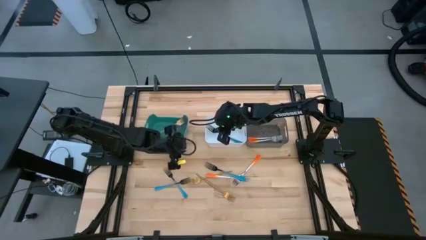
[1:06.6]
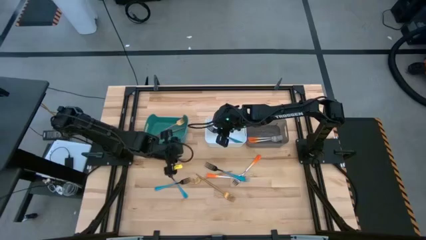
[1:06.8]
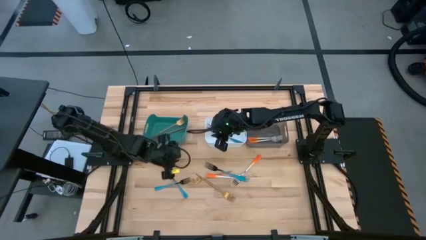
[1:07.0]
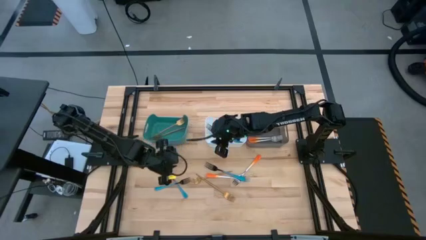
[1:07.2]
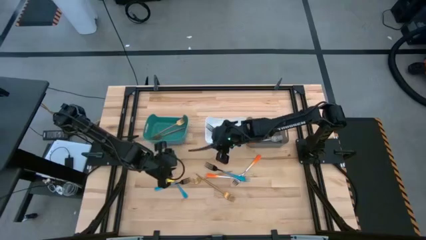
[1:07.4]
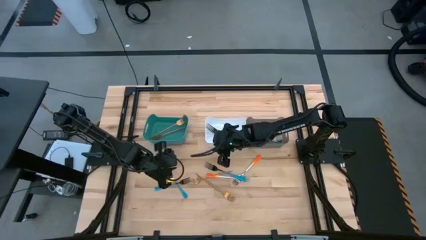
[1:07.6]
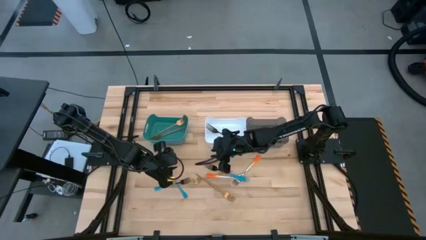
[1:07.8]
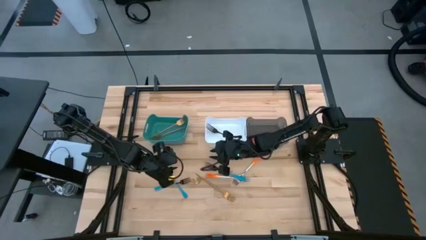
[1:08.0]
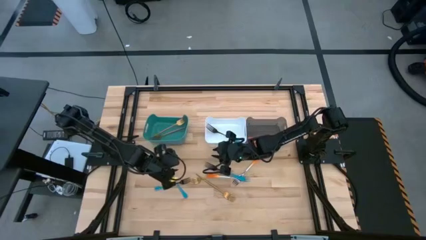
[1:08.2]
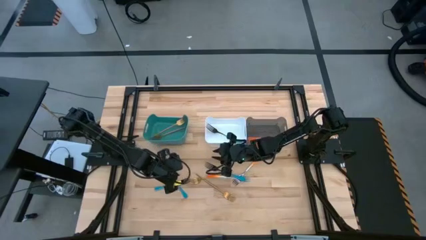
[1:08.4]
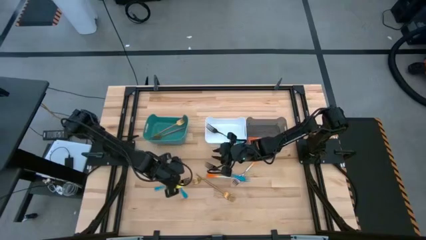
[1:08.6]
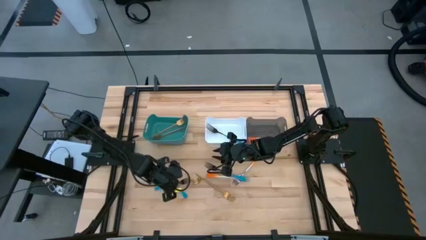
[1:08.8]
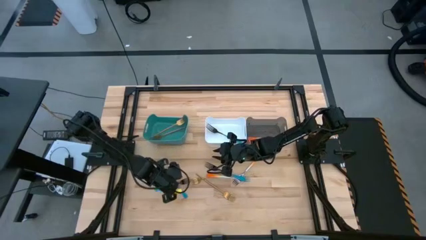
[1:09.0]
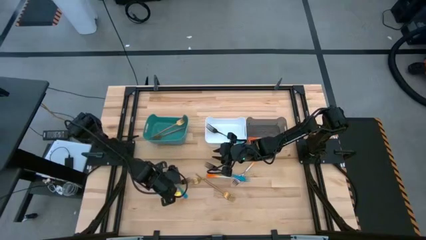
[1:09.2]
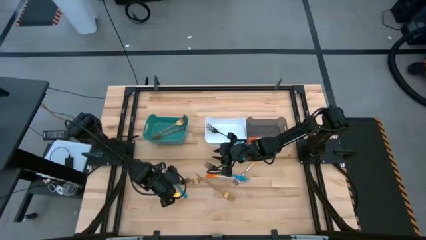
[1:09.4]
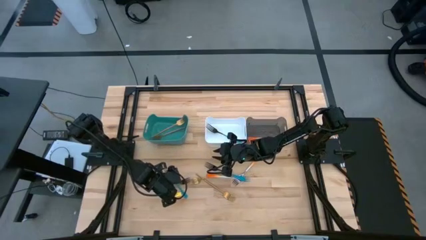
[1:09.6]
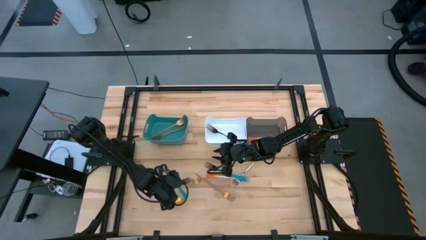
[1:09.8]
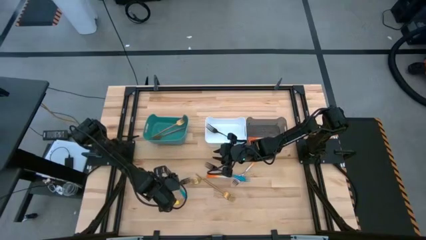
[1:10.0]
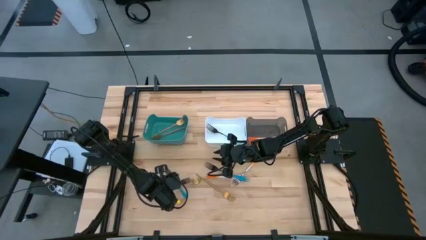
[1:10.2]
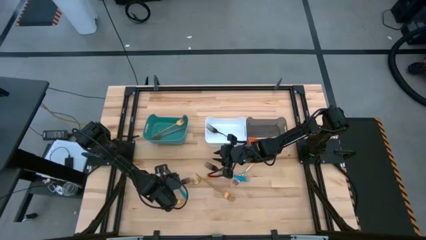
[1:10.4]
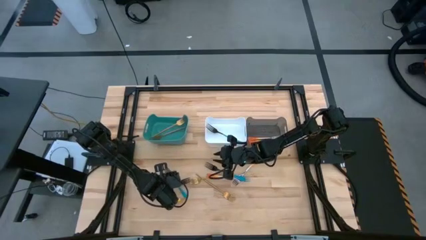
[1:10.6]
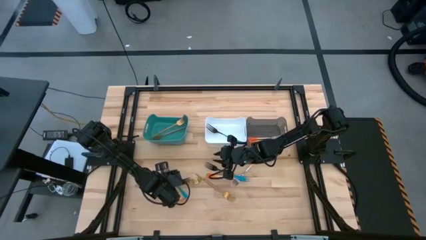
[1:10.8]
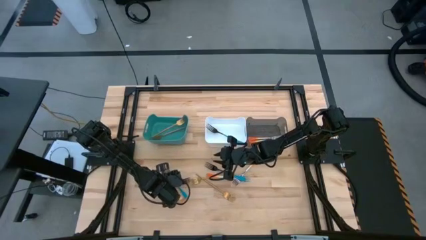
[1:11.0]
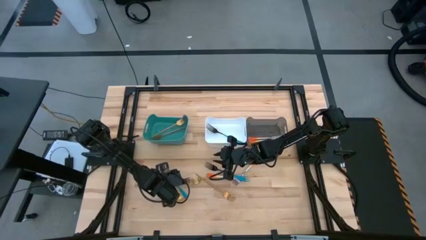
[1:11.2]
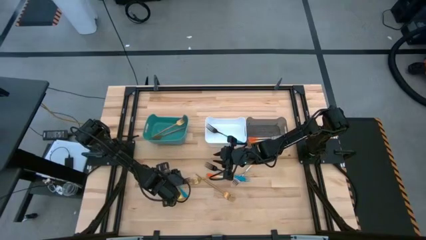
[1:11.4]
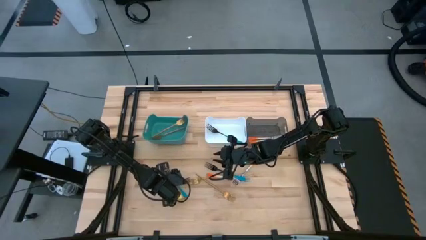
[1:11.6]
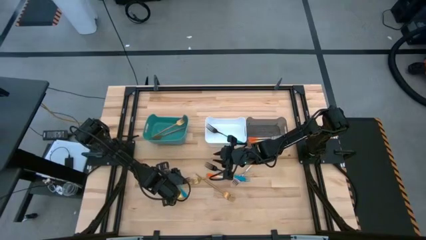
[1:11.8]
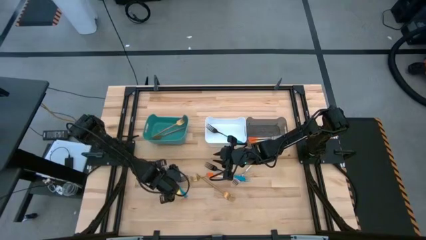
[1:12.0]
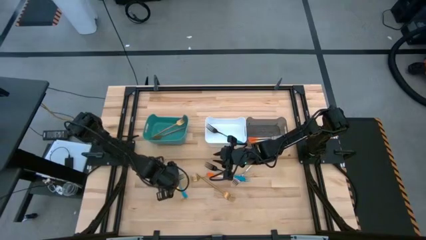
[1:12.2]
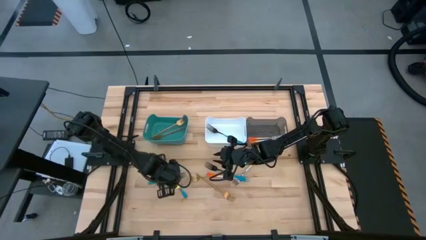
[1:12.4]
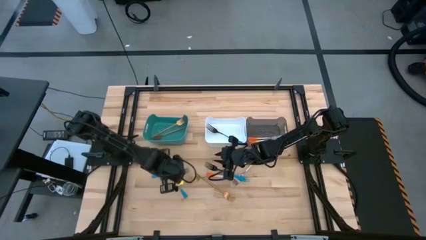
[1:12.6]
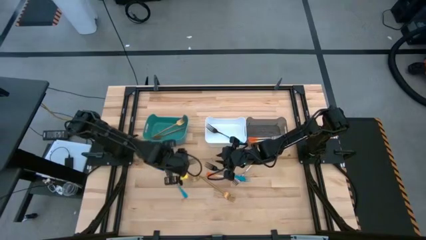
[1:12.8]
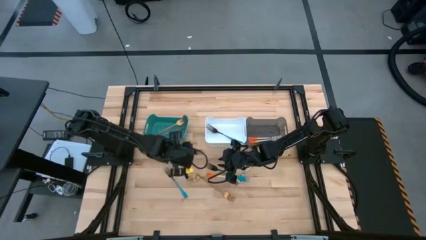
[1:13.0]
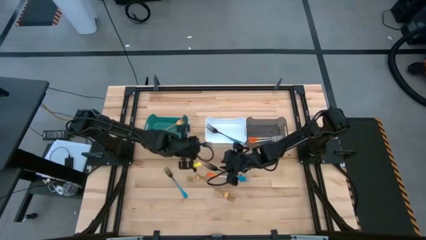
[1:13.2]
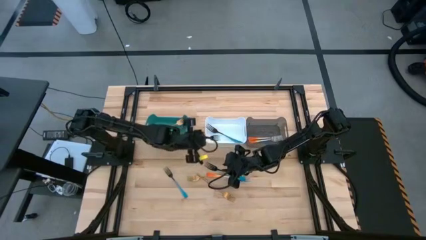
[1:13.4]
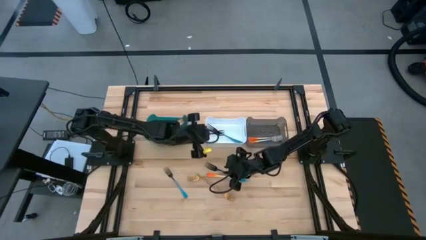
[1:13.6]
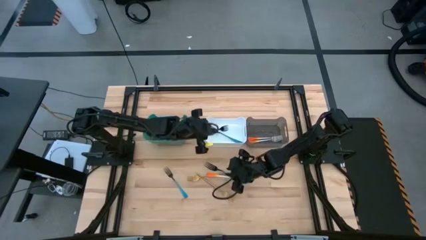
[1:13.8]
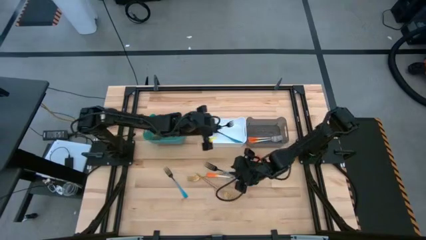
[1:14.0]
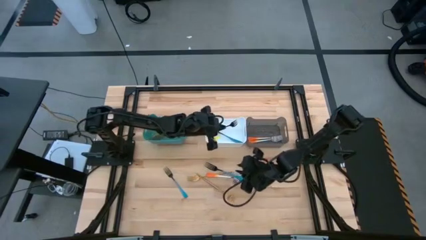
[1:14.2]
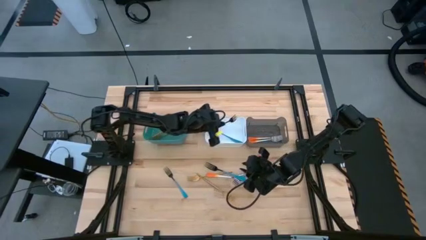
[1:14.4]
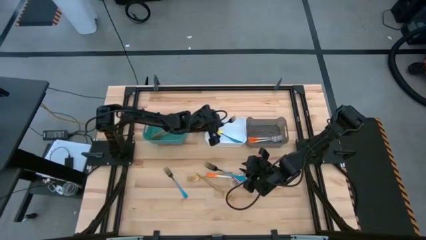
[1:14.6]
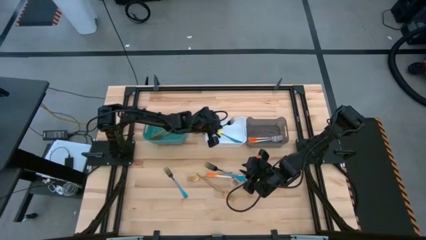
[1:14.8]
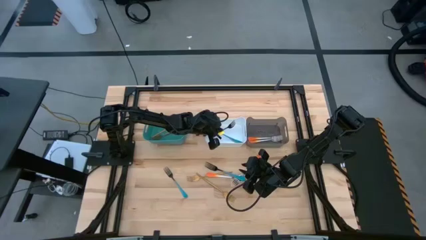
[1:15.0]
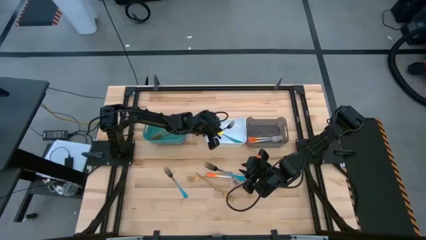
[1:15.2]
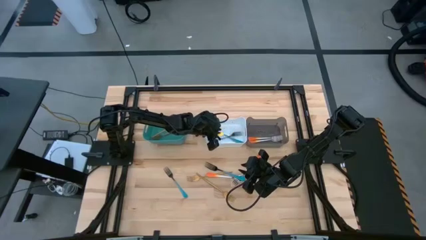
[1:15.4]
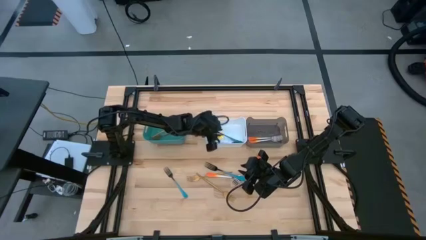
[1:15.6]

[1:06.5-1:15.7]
Task: Sort silverware by color (type)
Put the left blue fork into the white bin

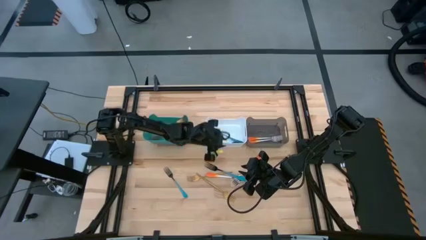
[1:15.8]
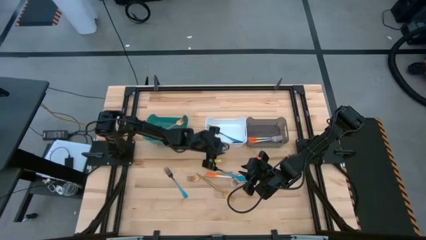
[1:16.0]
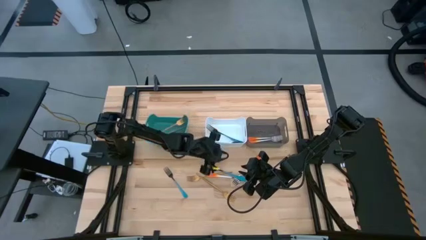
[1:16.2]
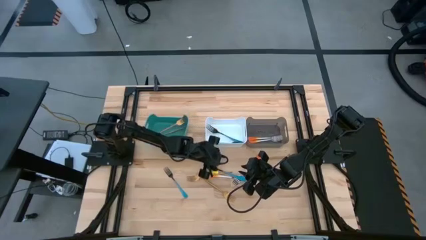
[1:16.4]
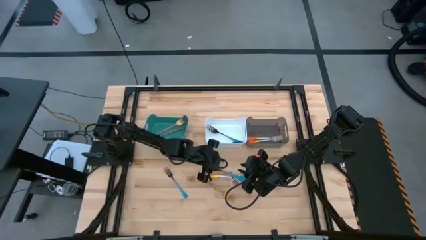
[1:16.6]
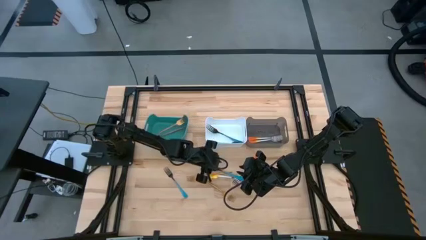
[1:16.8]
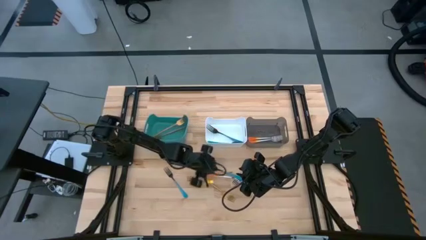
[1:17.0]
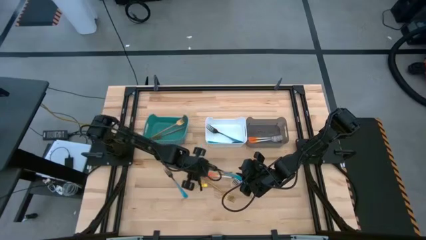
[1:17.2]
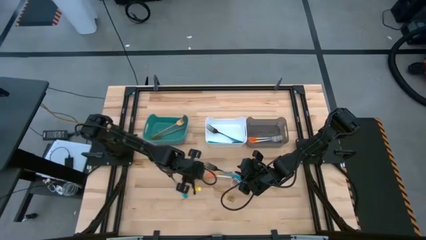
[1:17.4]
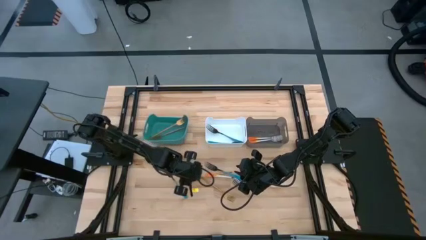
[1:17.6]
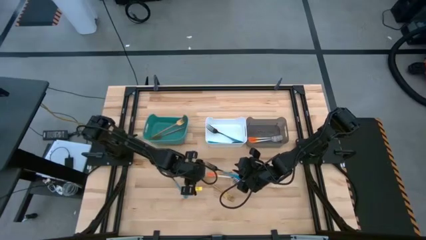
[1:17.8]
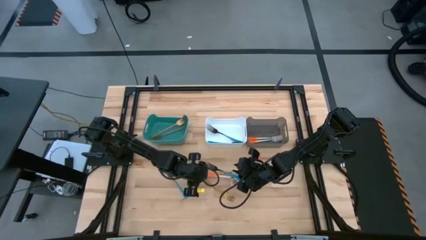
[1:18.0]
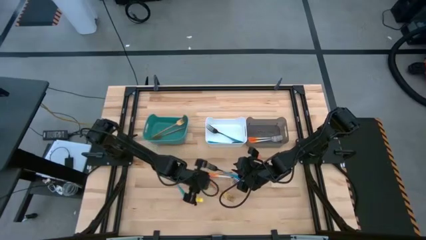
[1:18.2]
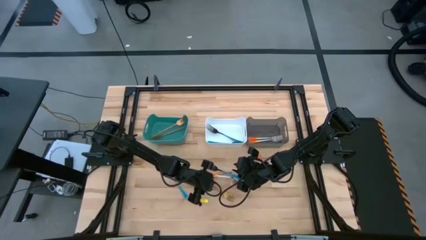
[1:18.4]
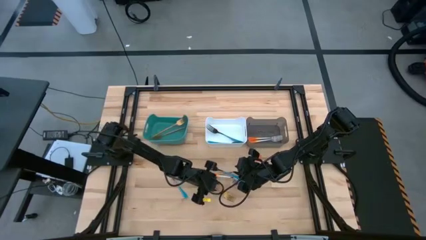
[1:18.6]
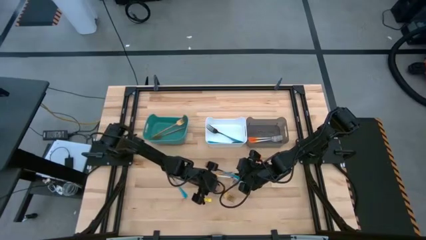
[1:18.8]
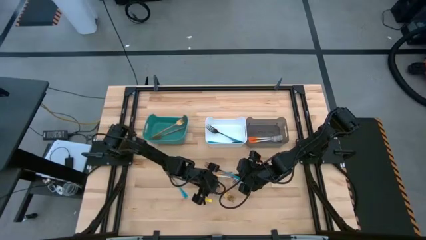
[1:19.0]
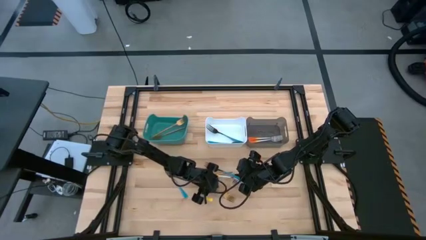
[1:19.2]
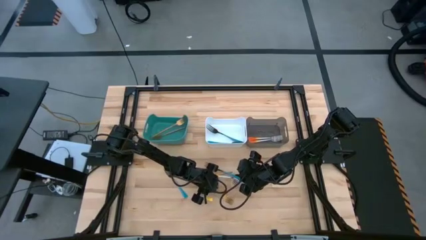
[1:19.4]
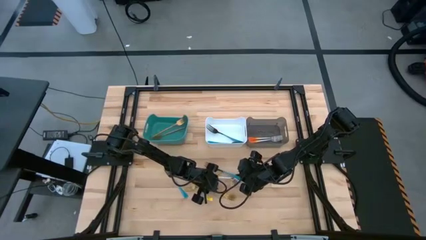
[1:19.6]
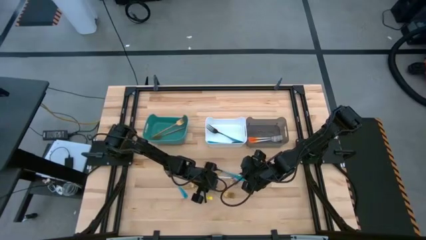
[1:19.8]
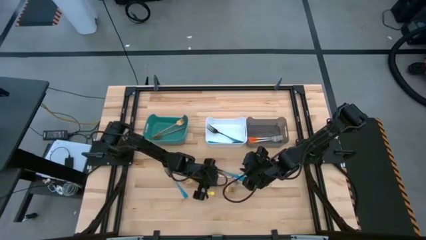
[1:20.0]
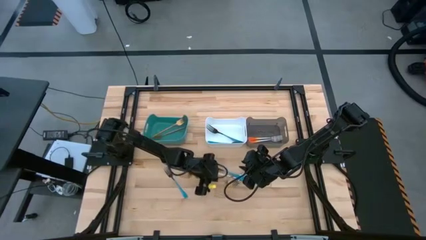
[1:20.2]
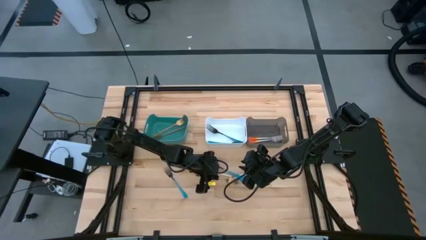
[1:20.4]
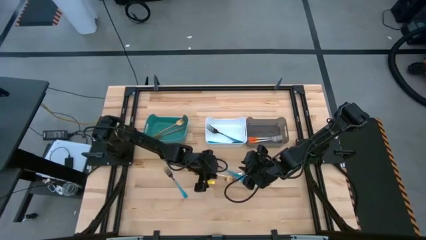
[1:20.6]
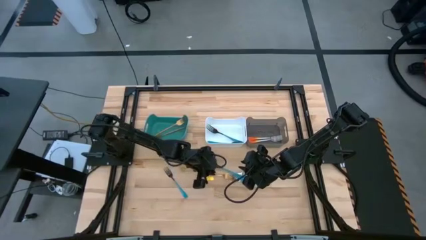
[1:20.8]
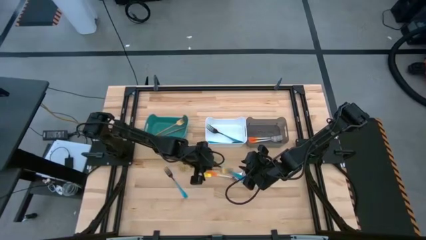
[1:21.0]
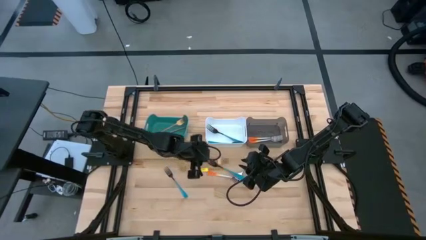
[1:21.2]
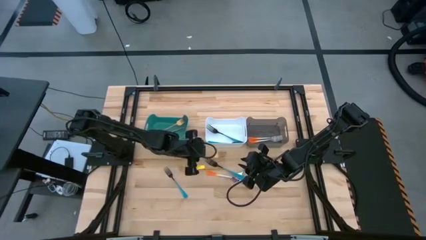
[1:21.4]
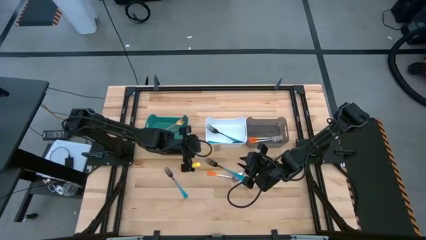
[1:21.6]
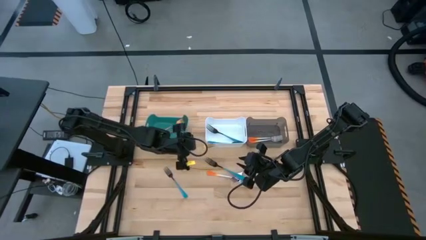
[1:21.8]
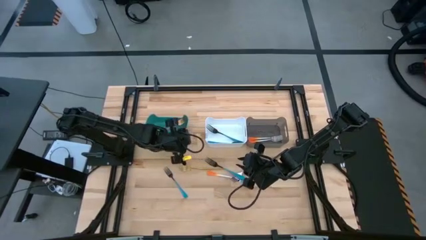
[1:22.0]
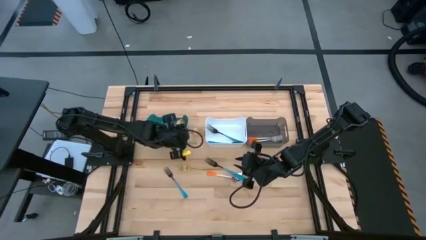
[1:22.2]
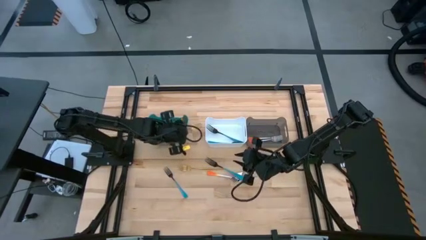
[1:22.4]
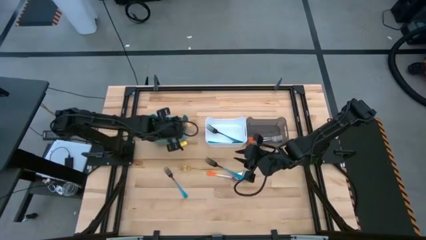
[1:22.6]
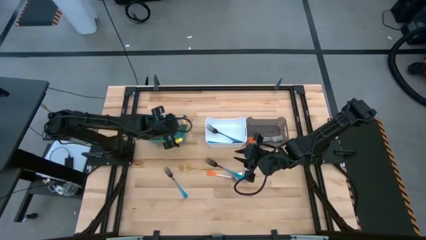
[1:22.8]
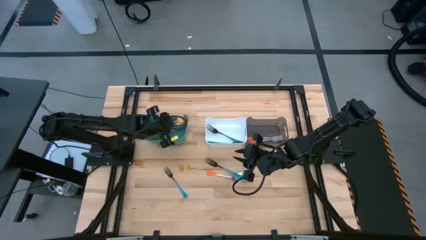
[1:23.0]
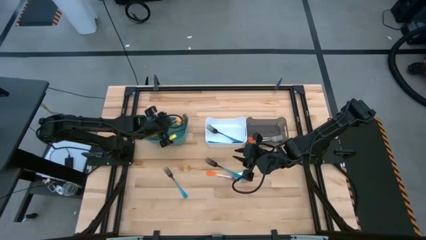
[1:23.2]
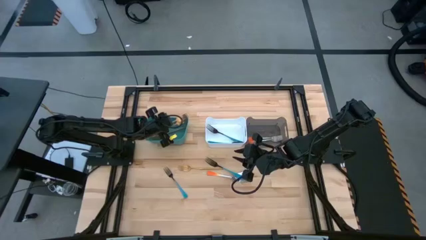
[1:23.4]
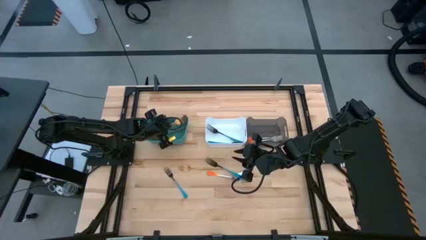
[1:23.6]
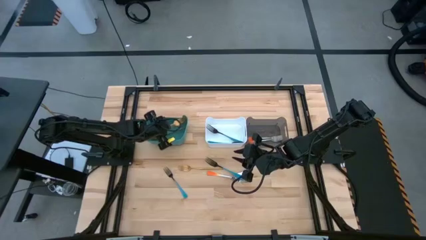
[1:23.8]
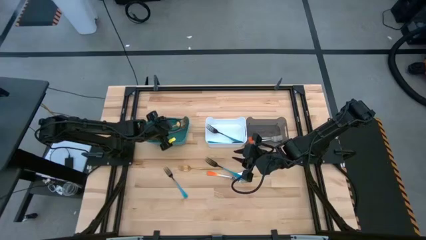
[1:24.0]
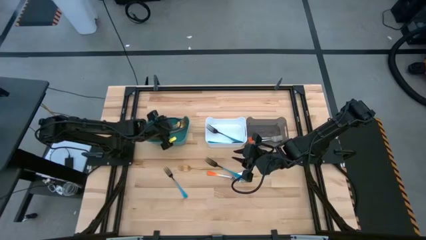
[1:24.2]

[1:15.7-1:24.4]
Put the bottom gold fork into the green bin
